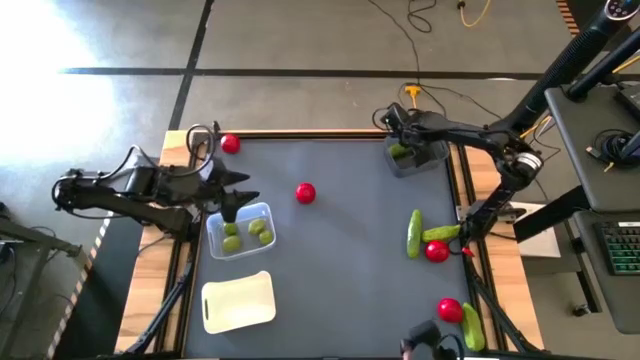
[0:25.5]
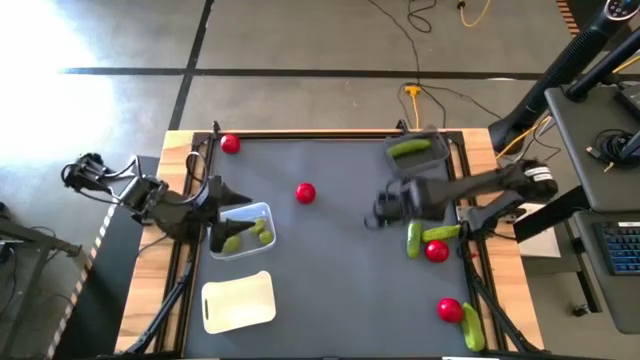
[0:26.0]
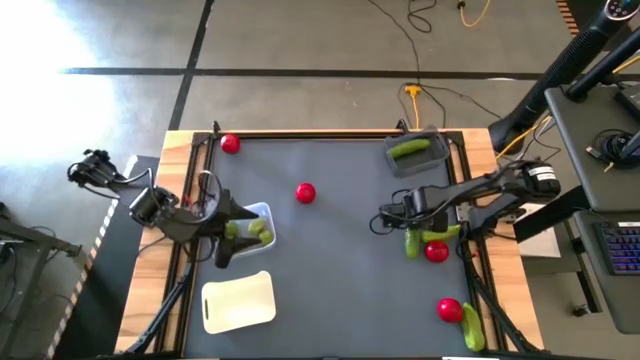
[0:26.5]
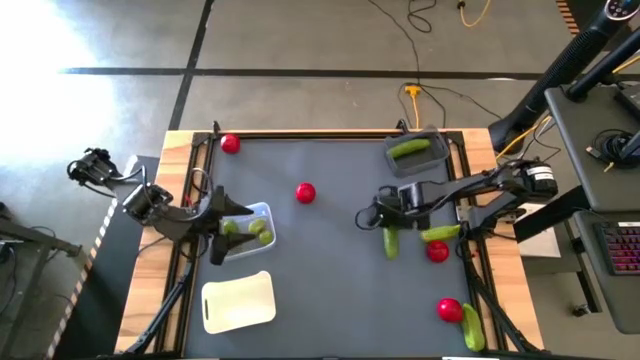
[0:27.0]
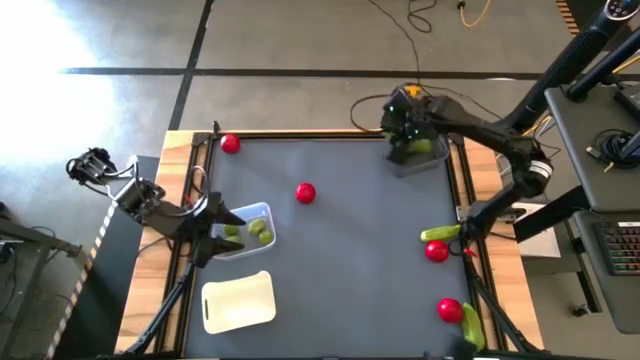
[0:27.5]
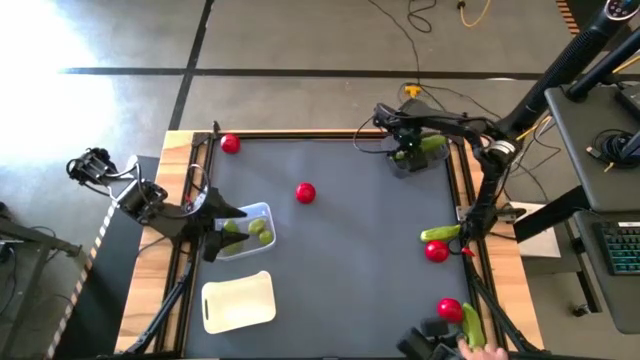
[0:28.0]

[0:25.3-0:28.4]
Task: Sort produce into baskets
Put the cucumber into the black bin

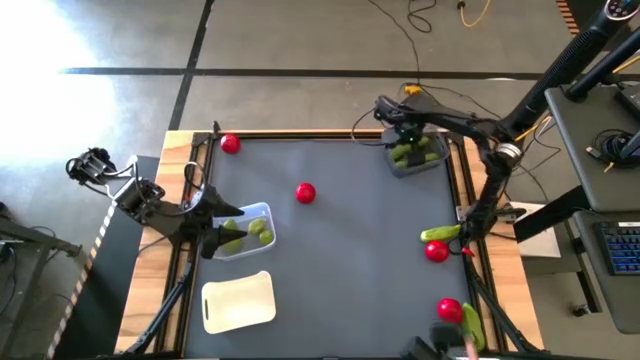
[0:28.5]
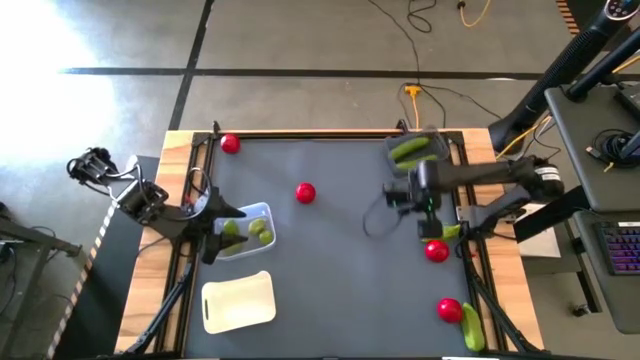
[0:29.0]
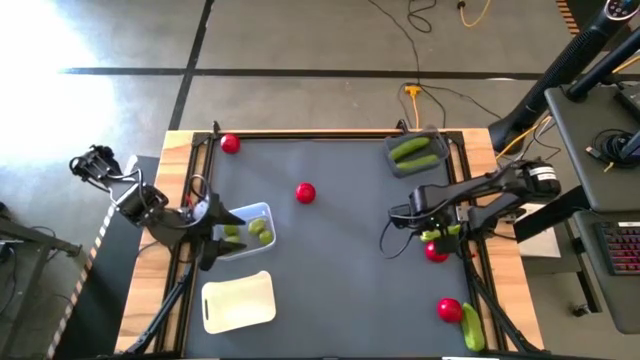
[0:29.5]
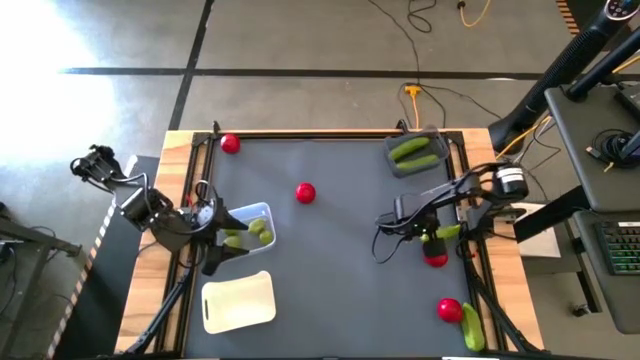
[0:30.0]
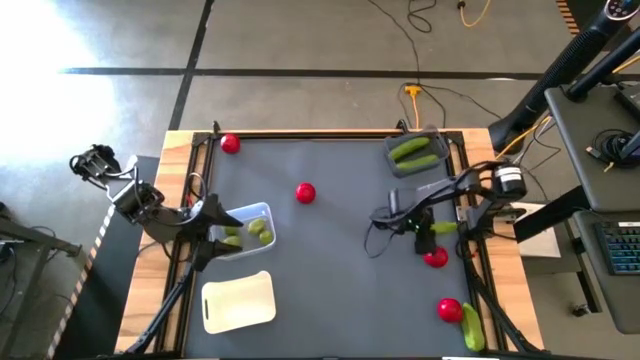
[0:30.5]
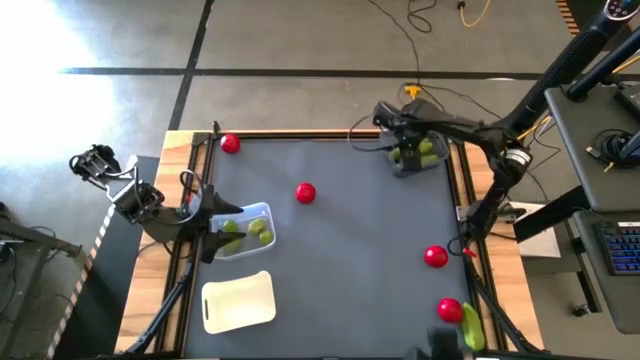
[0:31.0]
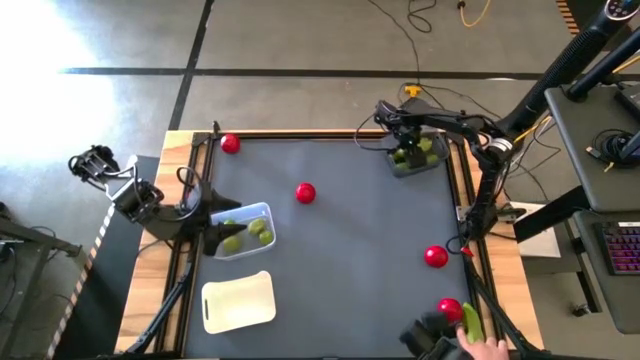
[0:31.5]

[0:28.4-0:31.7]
Put the cucumber into the black bin

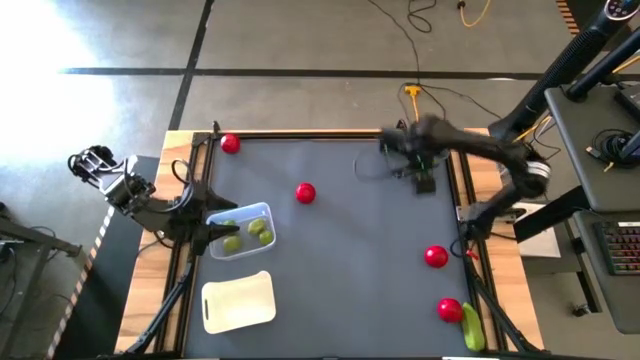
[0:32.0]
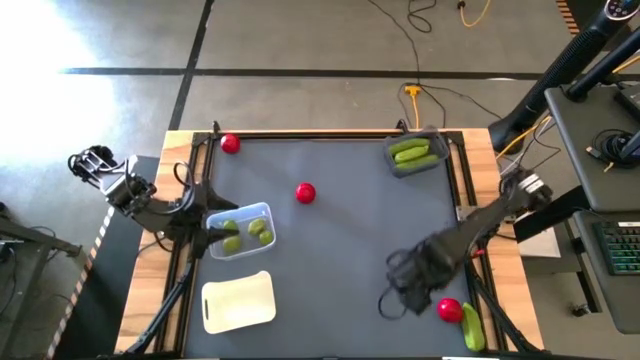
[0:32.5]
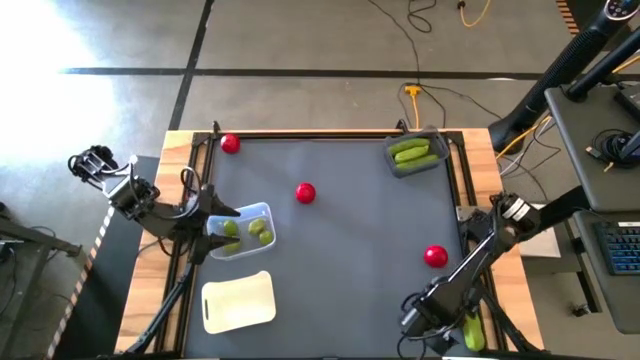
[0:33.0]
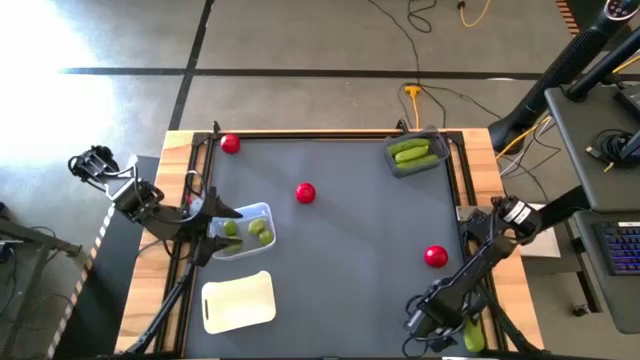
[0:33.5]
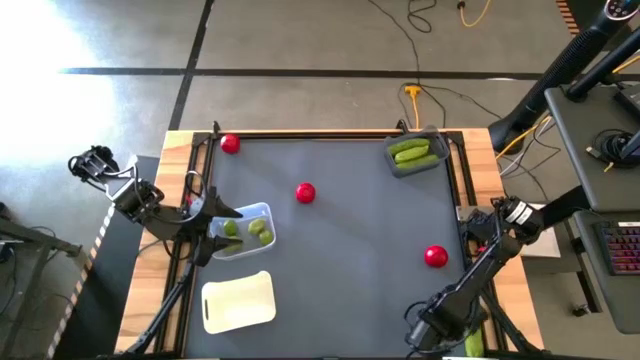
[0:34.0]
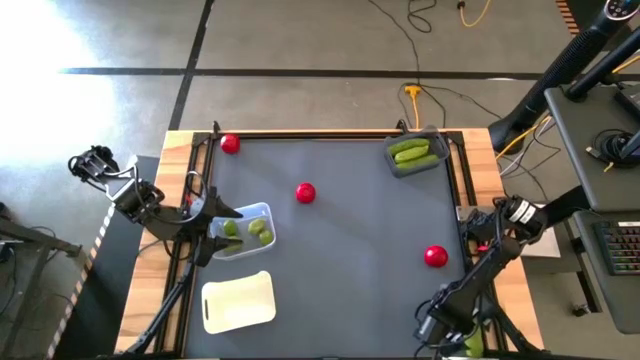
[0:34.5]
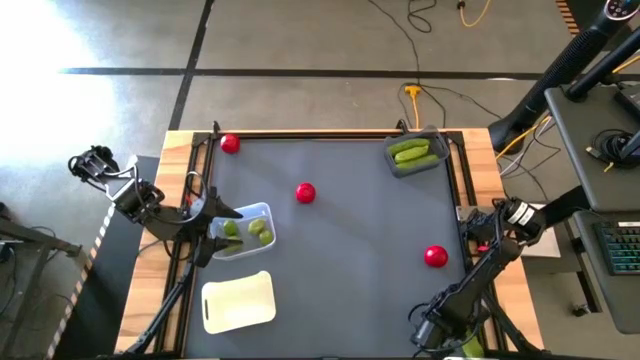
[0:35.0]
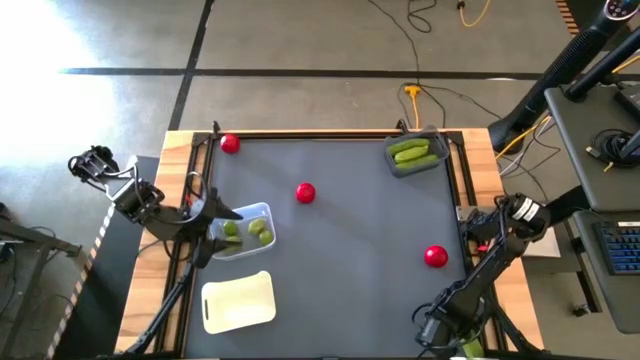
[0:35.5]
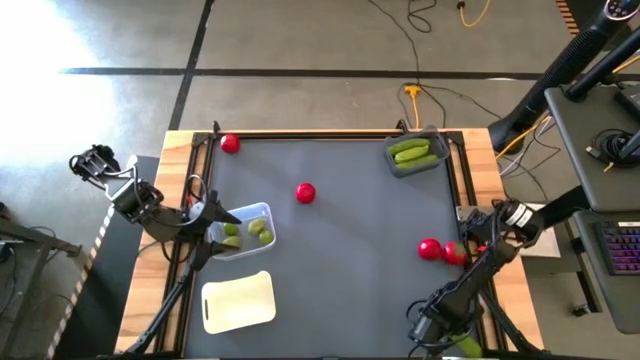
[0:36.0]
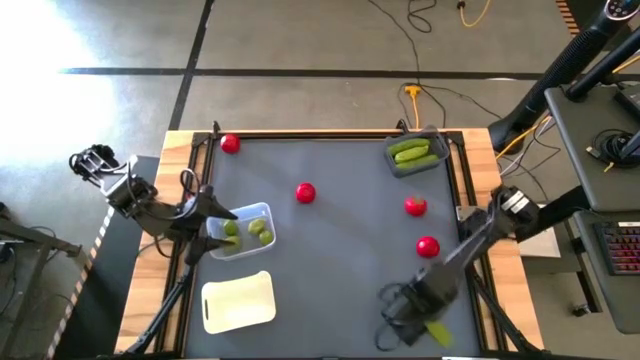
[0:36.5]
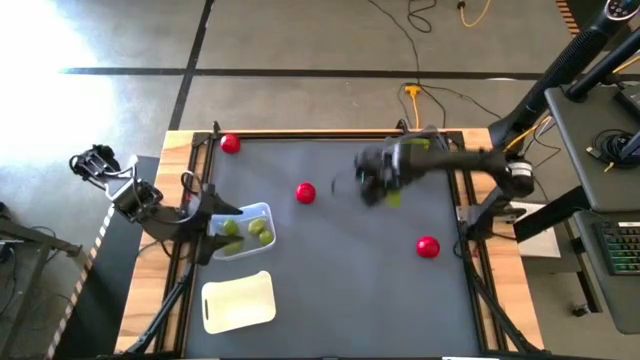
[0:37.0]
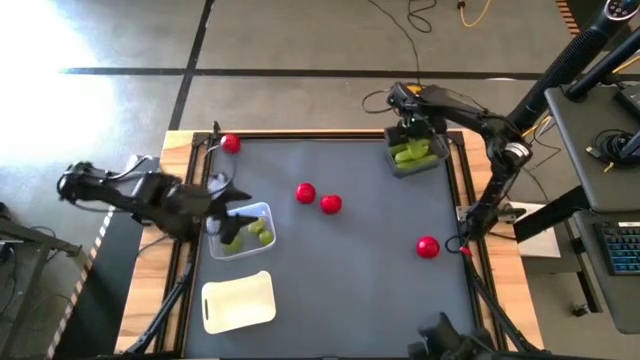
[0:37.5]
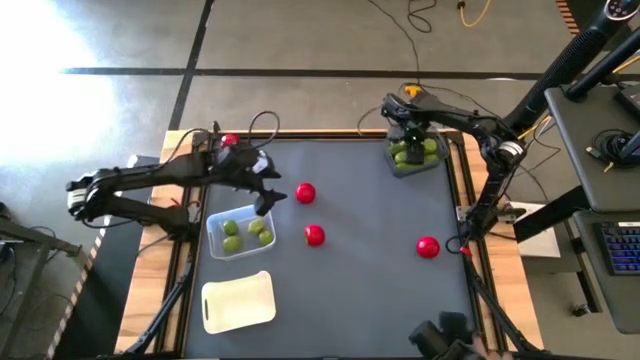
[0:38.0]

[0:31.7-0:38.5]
Put the cucumber into the black bin

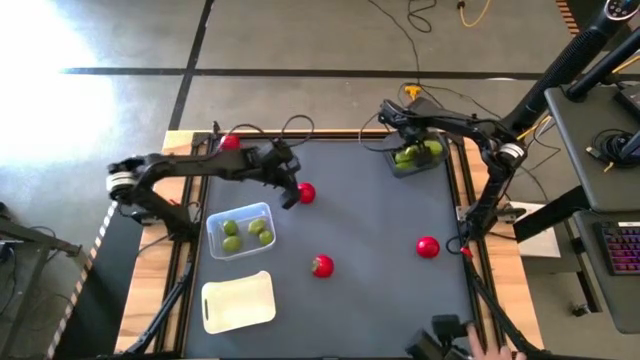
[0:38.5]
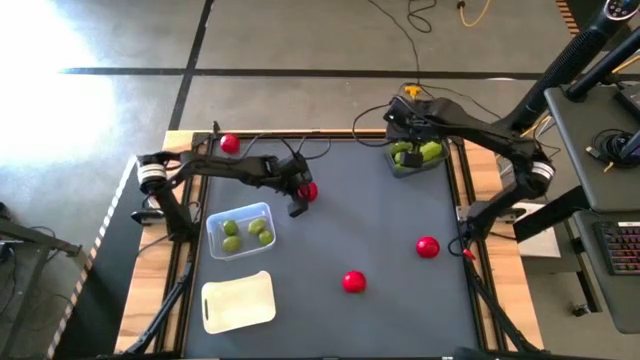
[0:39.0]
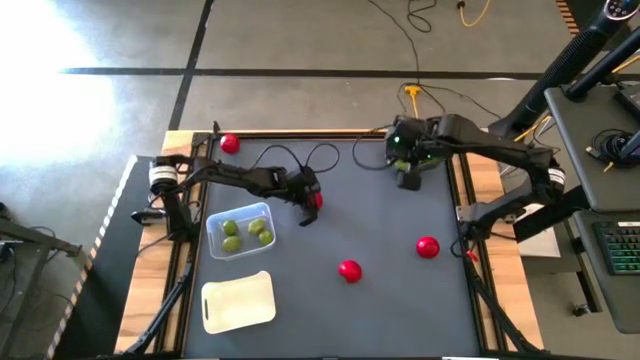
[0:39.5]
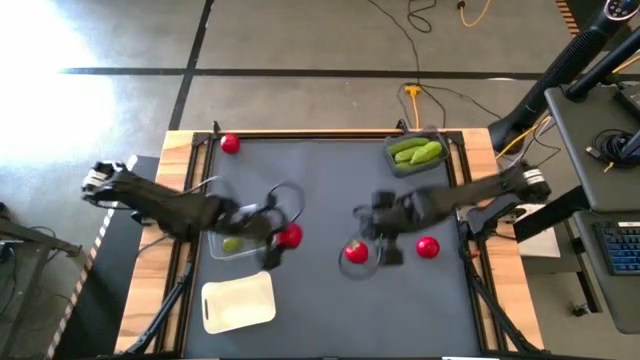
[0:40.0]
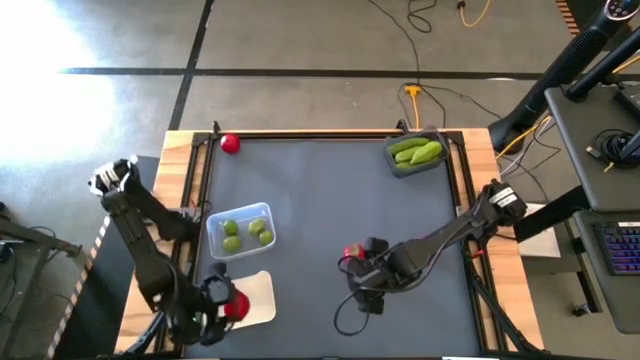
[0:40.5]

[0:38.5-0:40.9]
Put the tomato into the white bin

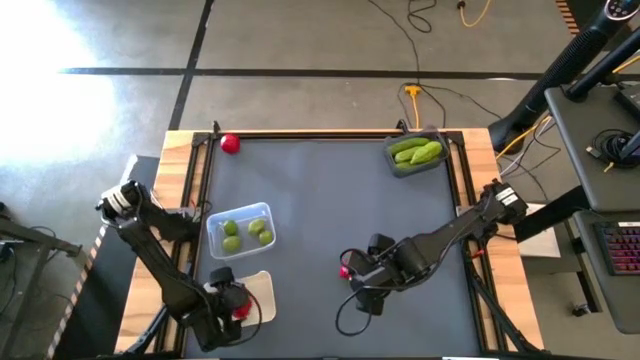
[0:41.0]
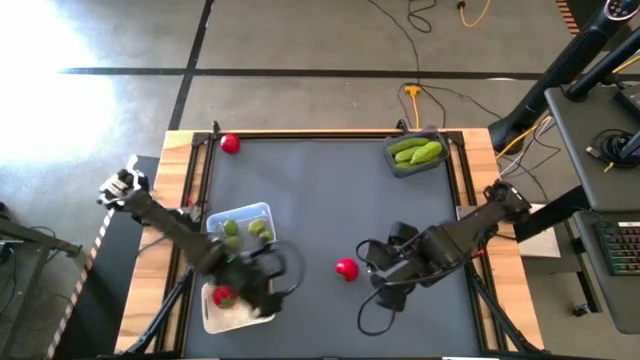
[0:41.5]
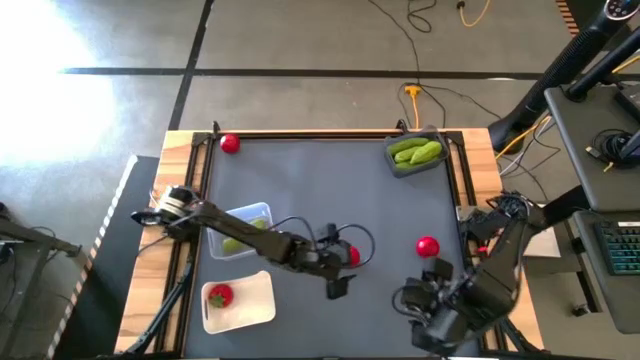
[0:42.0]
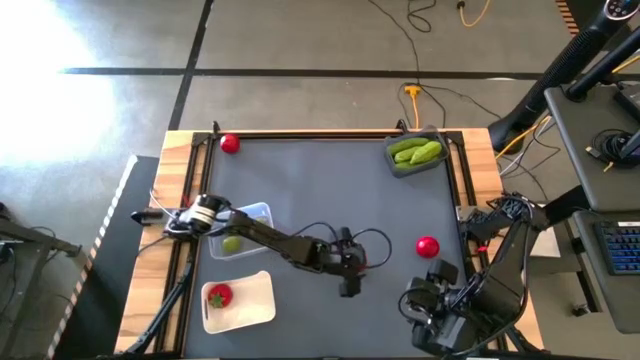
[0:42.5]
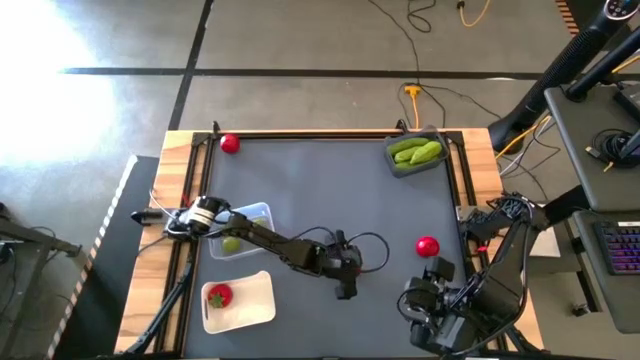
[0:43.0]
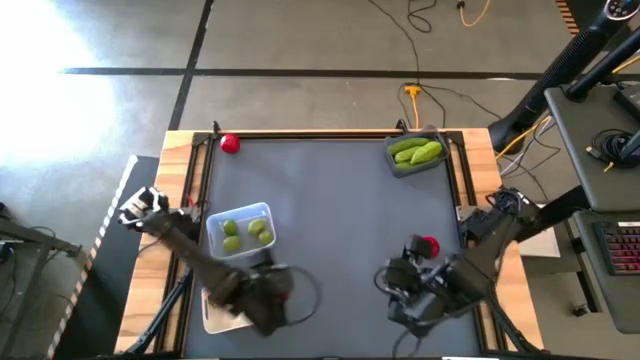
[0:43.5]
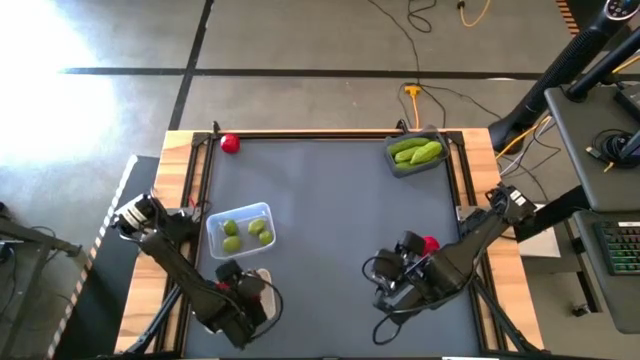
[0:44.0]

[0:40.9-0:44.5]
Put the tomato into the white bin

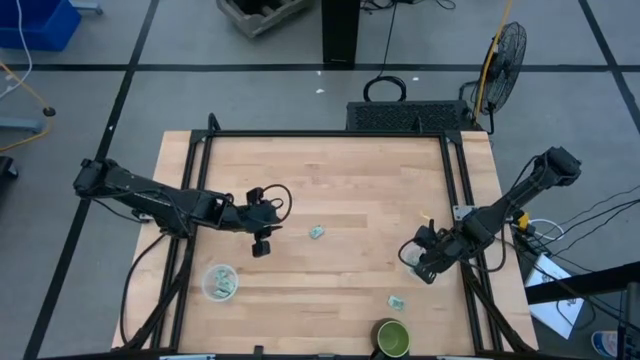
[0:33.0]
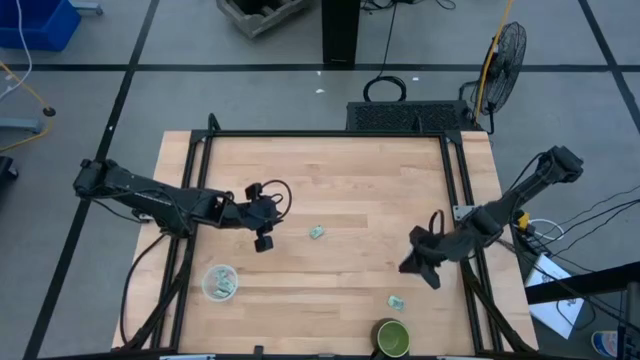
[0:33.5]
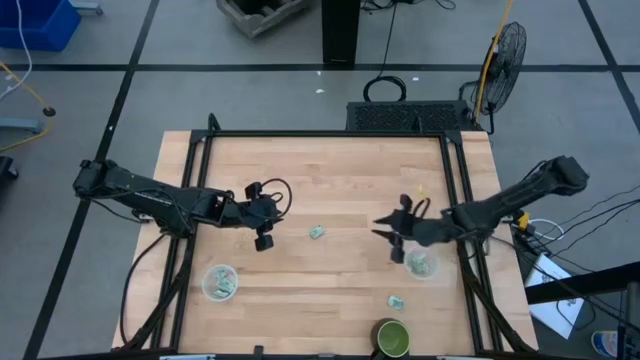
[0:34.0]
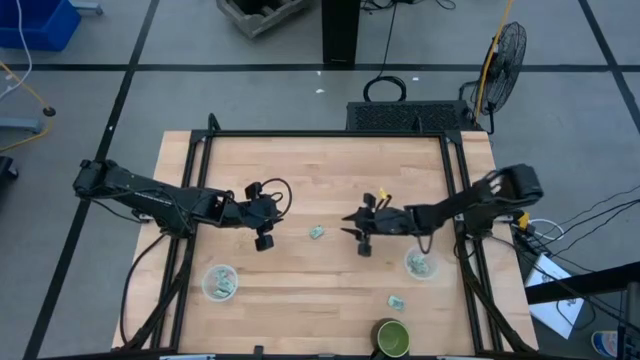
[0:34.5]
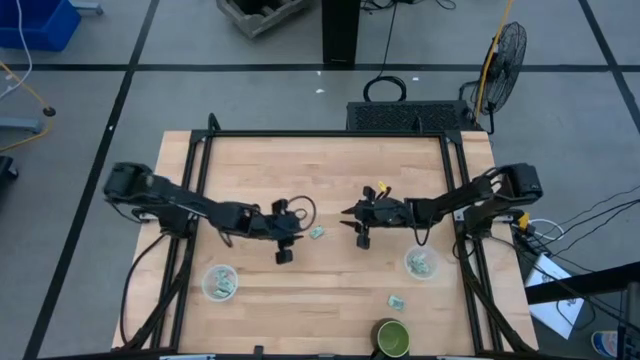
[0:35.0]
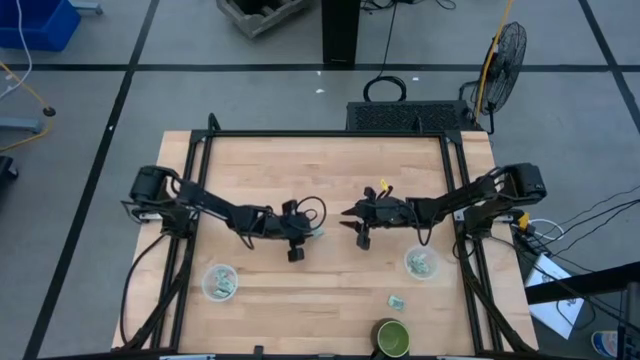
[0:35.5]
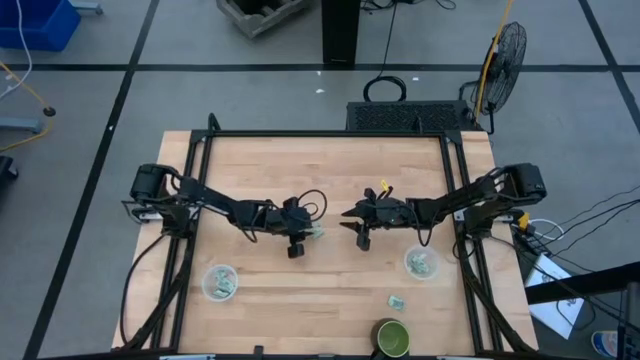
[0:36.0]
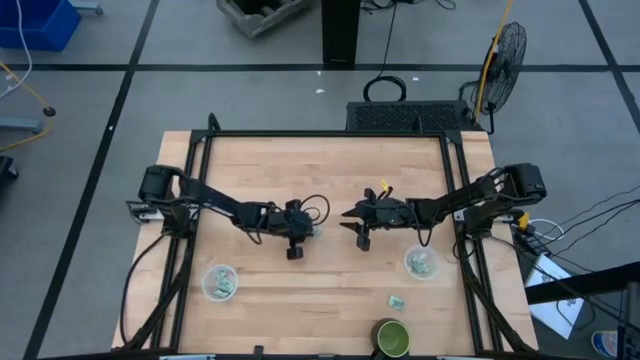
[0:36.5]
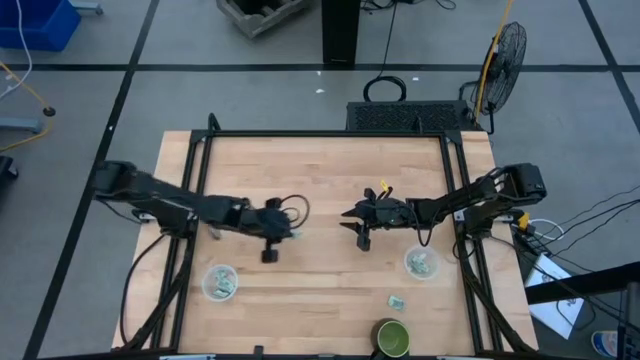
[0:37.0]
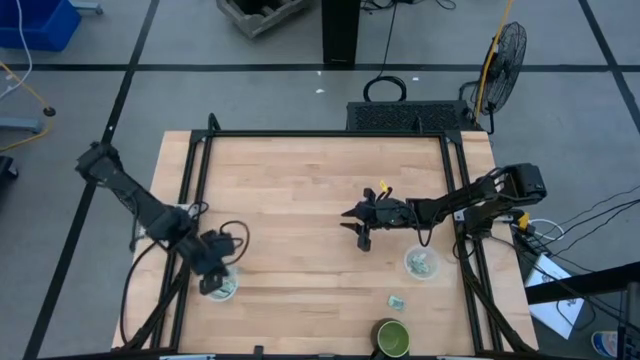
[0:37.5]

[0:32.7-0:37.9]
Task: Pick and place Stevia / Truvia into bins
Put the Stevia packet into the left transparent plastic container
